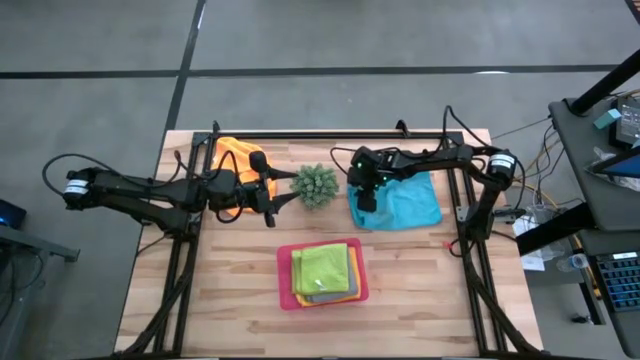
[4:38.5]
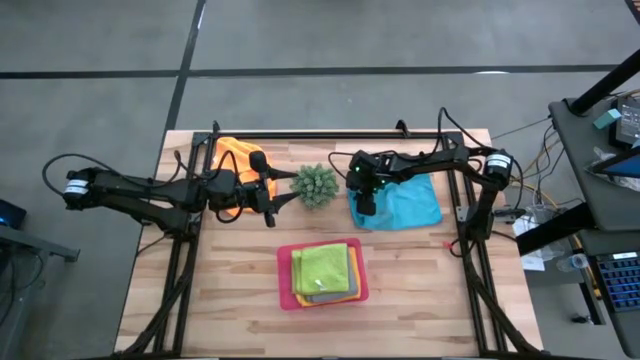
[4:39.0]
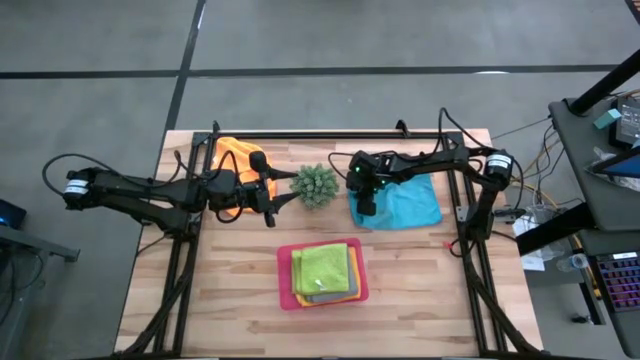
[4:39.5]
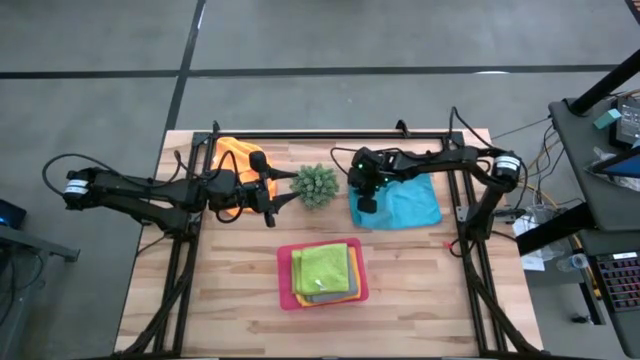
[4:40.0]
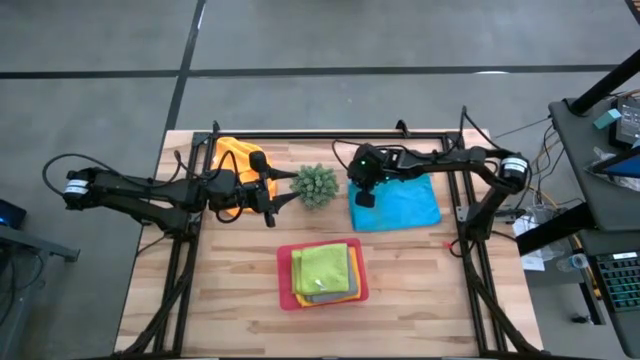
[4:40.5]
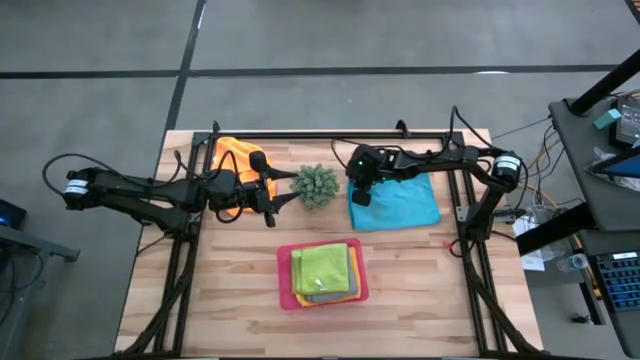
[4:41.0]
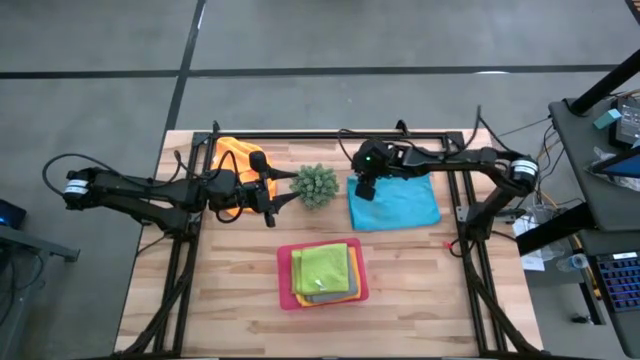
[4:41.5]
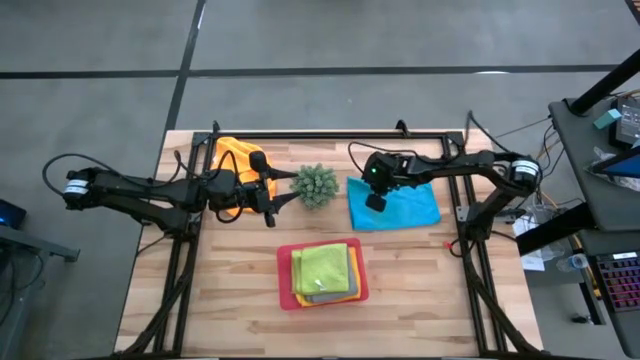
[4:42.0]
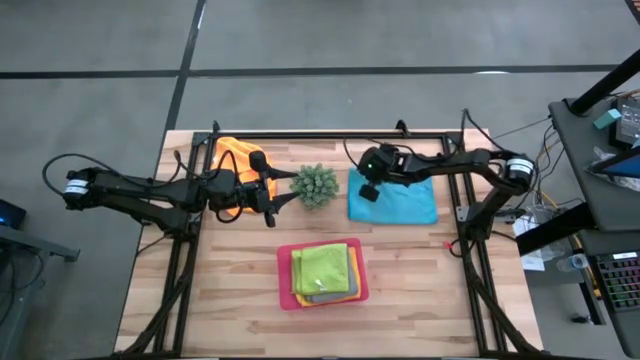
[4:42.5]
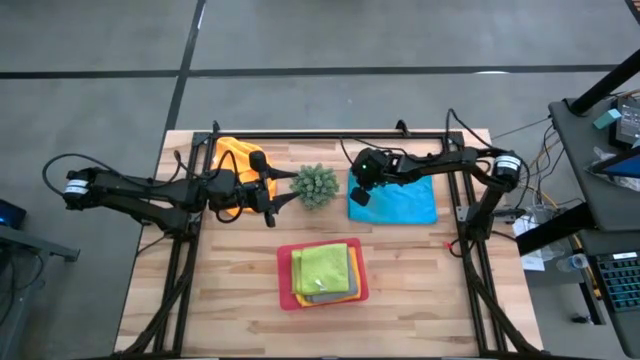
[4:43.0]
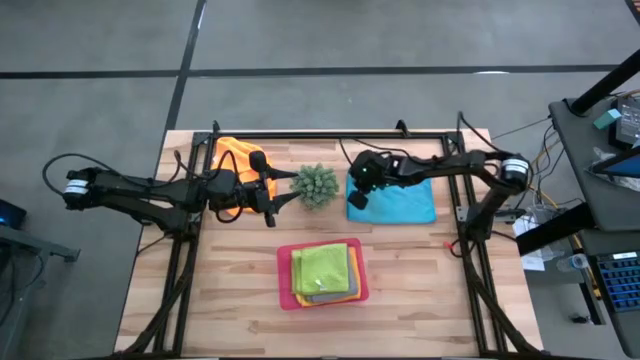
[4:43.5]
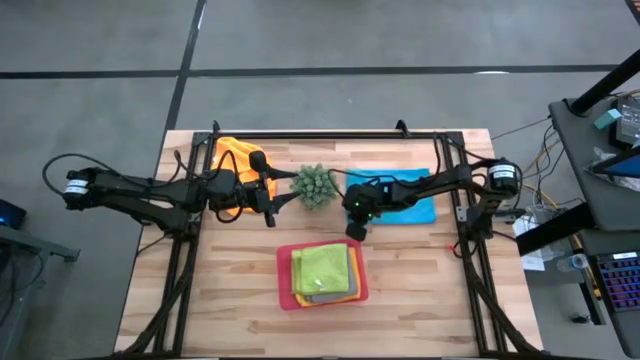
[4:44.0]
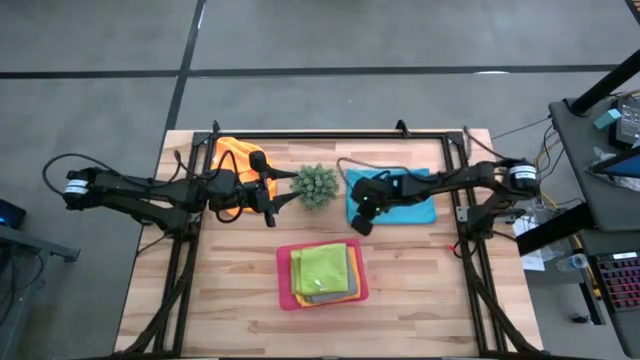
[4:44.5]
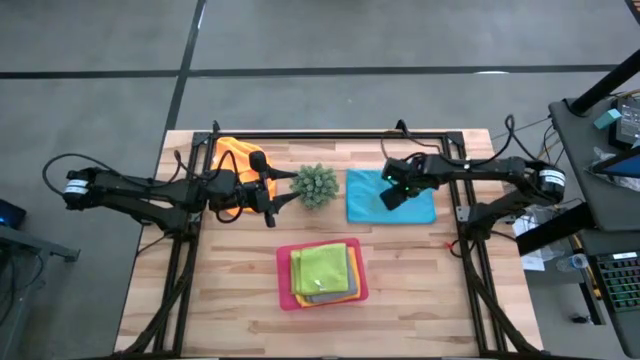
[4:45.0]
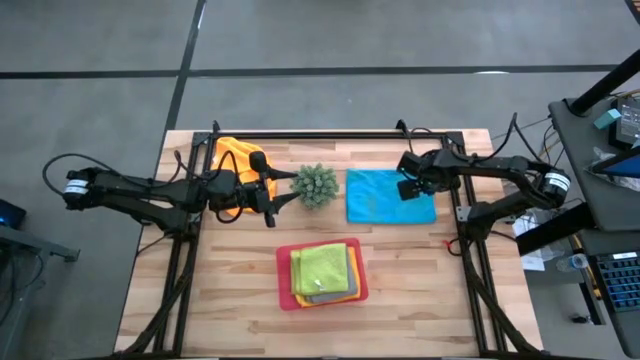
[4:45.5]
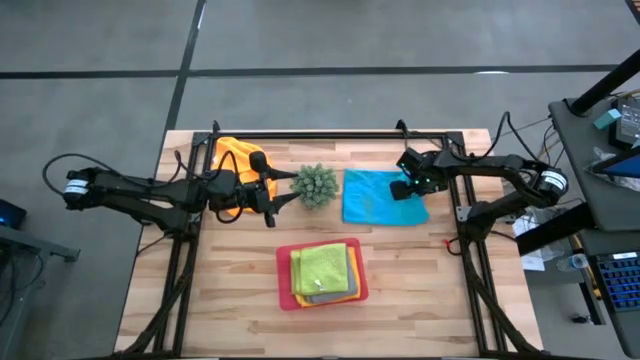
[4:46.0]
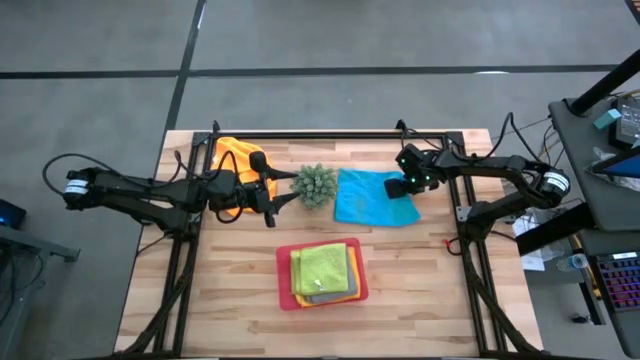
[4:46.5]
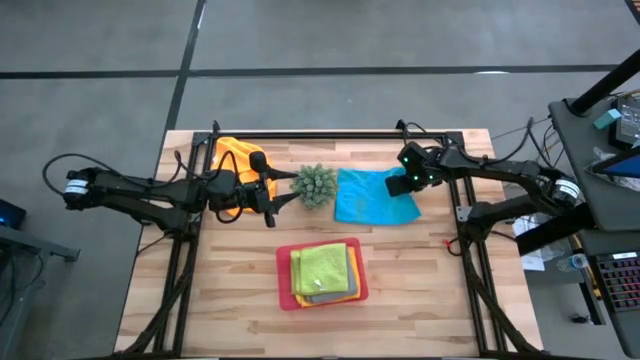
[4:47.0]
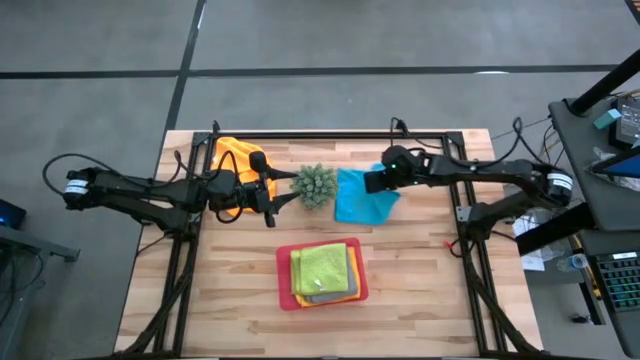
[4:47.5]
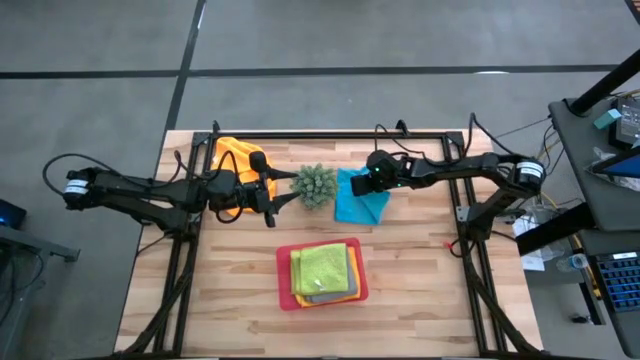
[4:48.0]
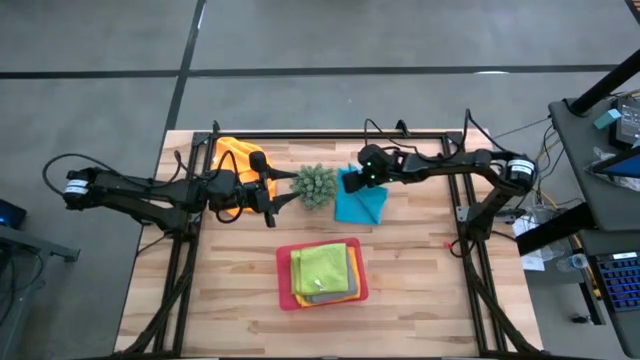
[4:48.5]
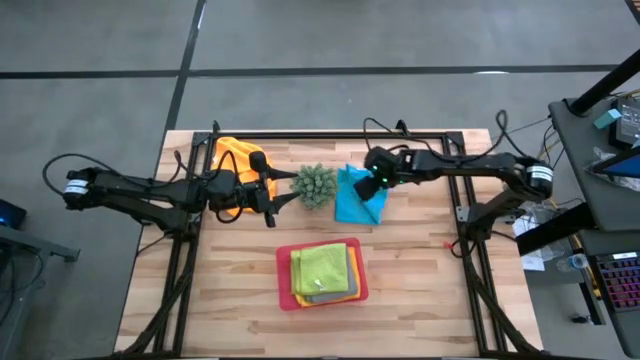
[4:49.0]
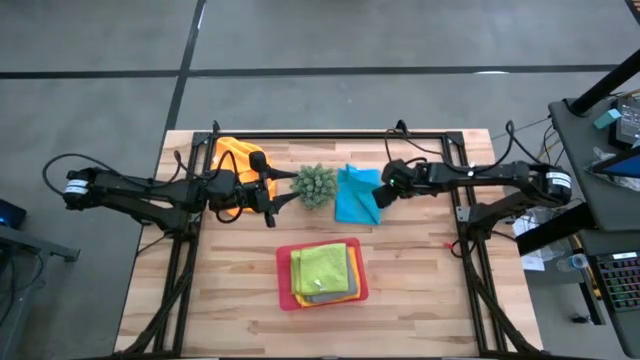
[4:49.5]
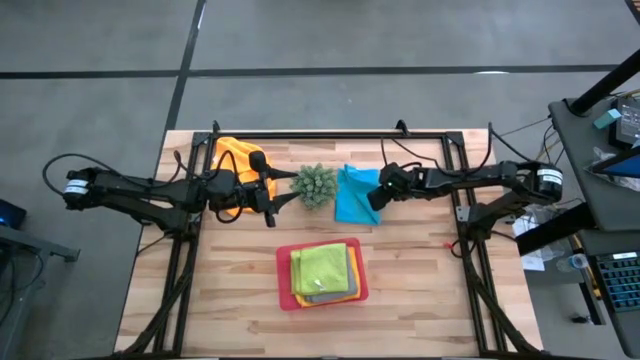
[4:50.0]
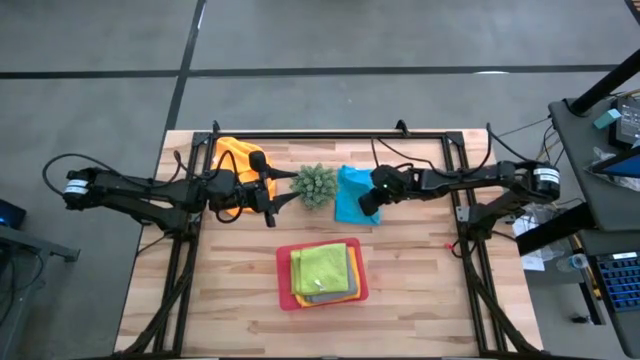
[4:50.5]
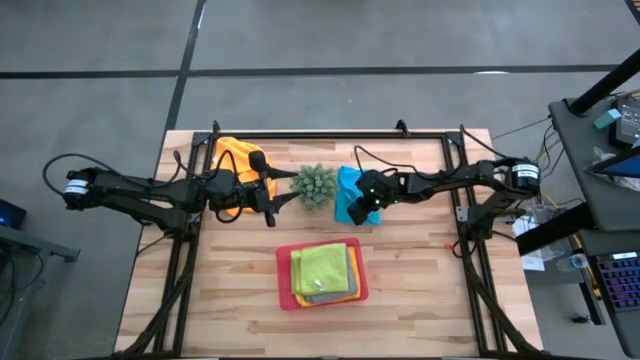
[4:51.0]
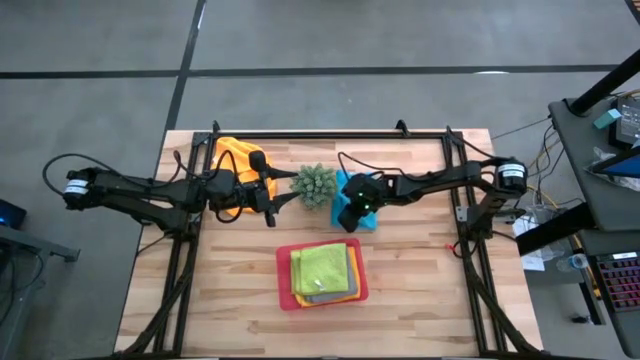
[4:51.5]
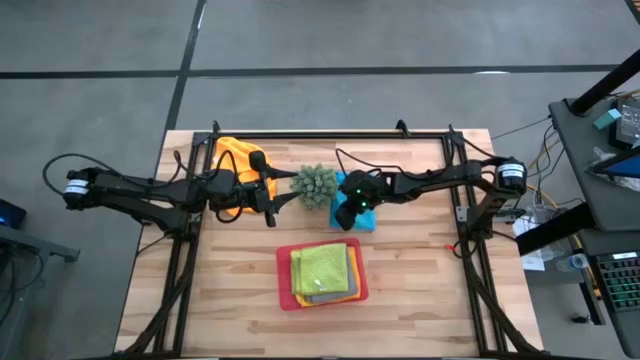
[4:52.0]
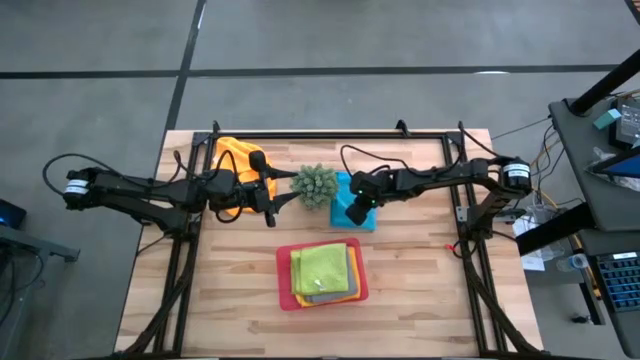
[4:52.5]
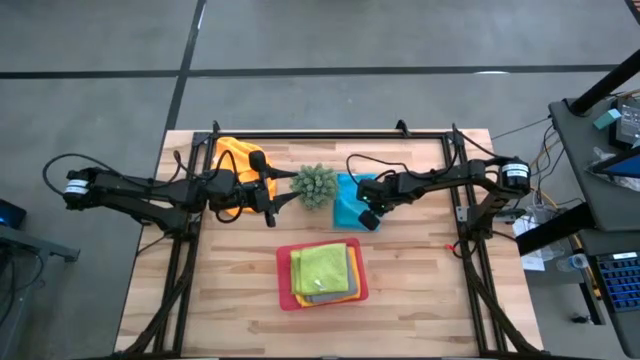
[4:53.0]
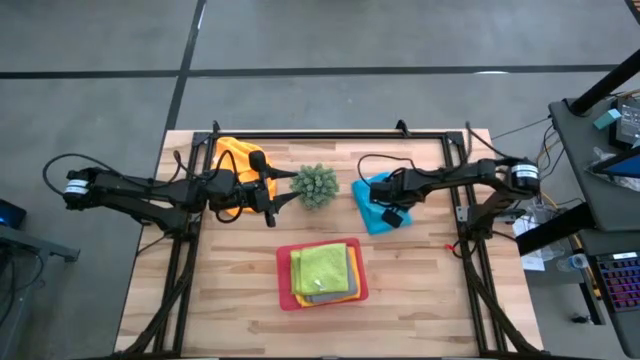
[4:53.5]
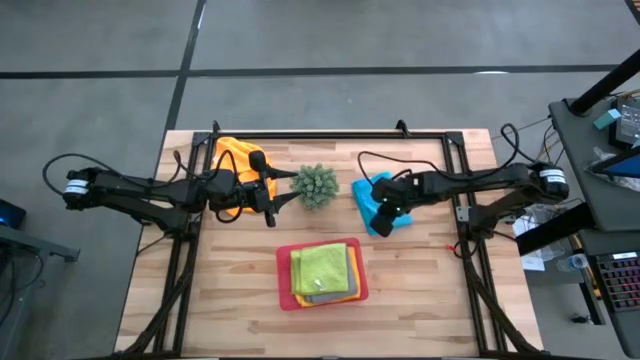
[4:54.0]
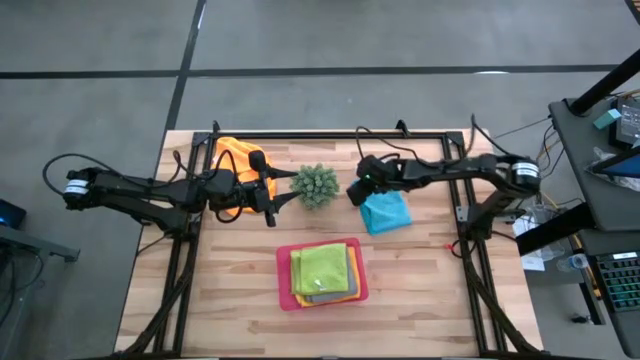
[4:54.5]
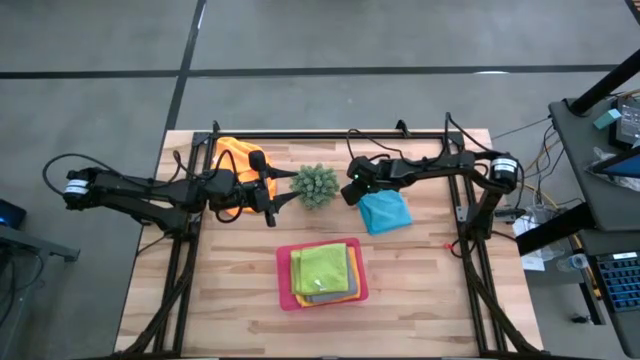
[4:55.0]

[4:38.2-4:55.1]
Task: Fold microfiber towels
Fold the blue microfiber cloth

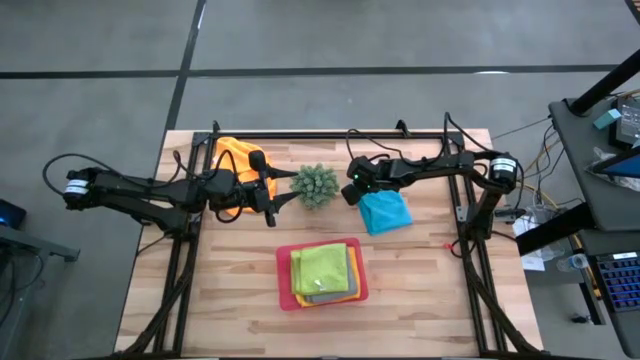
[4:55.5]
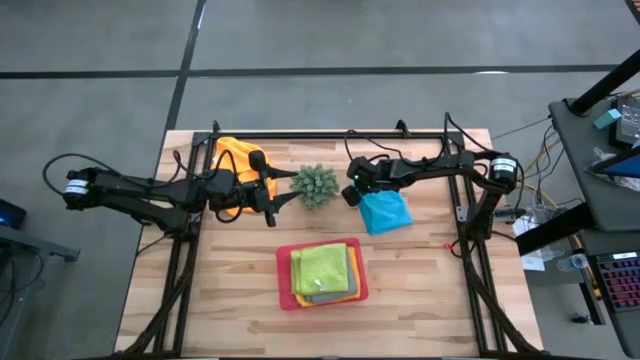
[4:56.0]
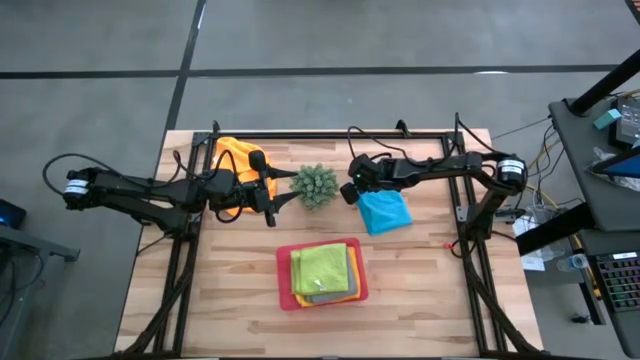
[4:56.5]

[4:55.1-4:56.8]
Fold the blue microfiber cloth

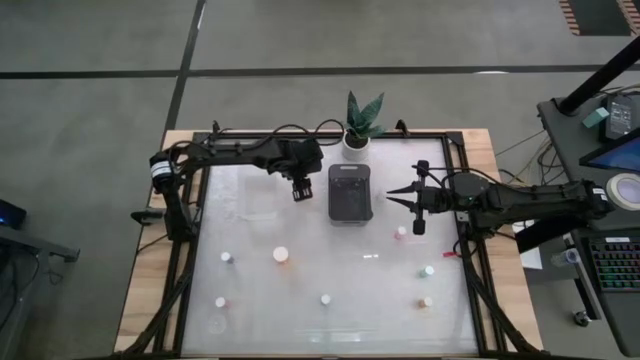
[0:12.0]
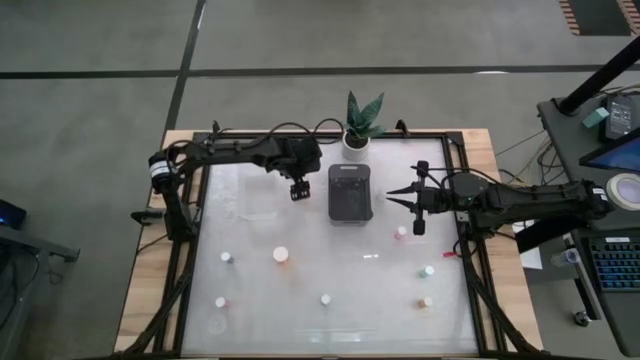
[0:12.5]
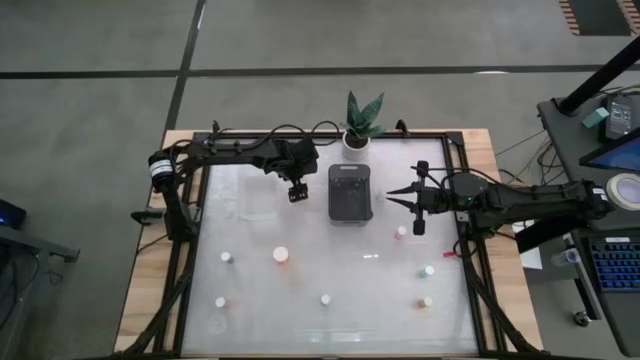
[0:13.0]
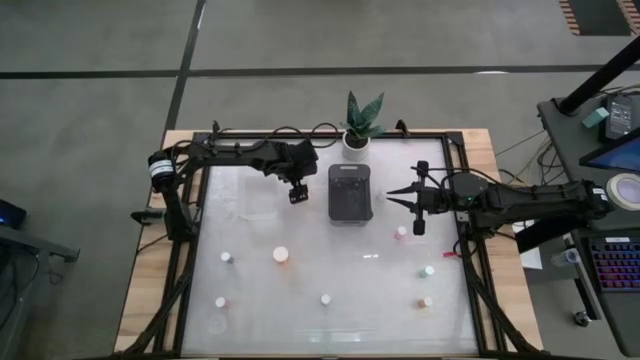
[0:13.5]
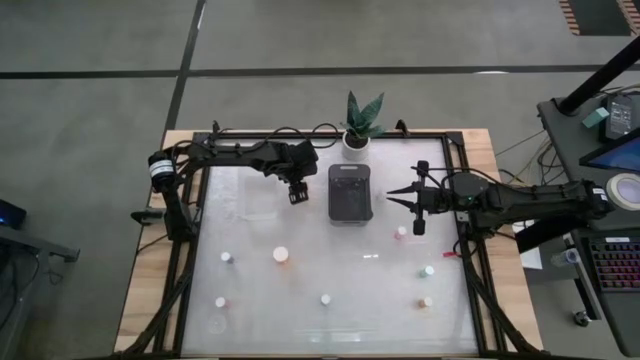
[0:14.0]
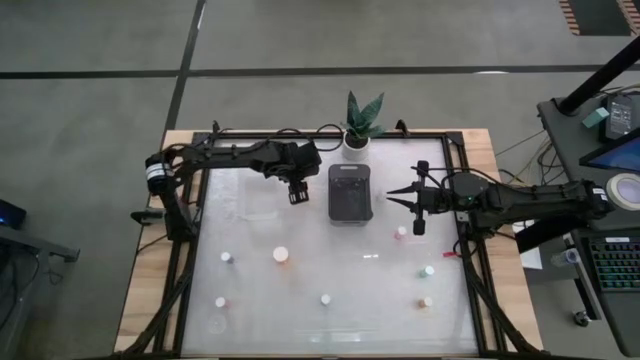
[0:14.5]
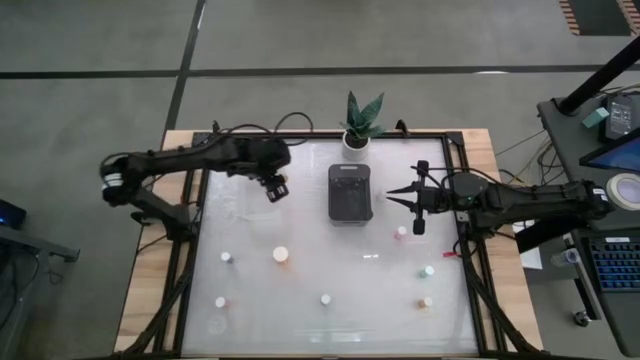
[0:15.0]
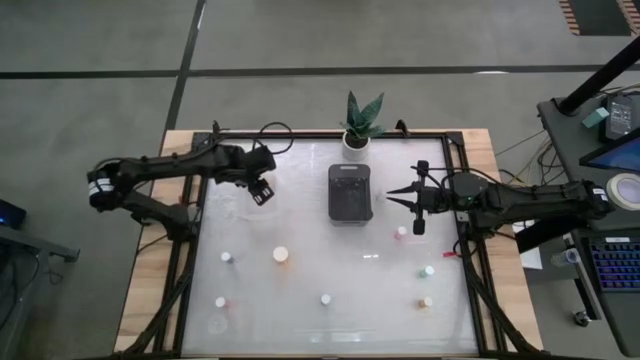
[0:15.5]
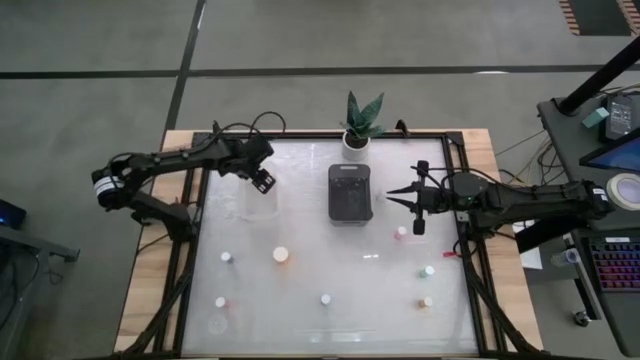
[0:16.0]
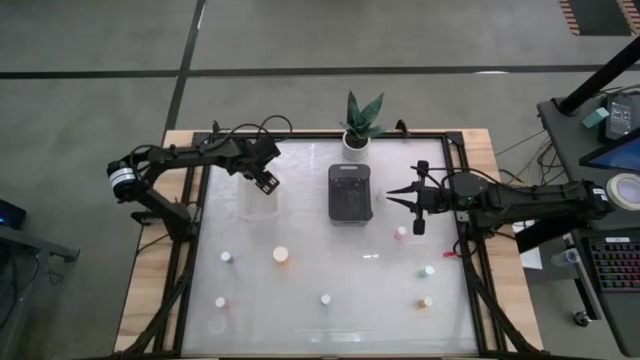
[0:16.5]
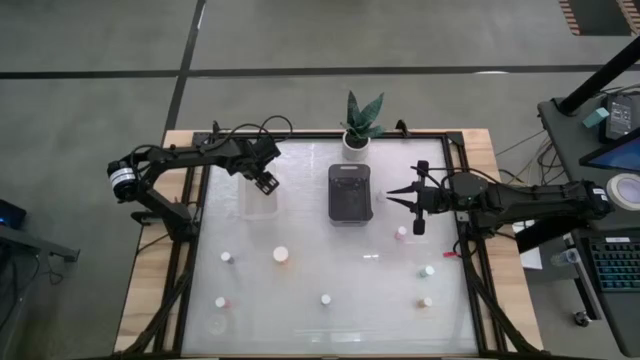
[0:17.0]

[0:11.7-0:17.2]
Task: Pick and place medicine bottles into bin by pill shape (circle, oval)
Put the top center yellow pill bottle into the transparent bin
